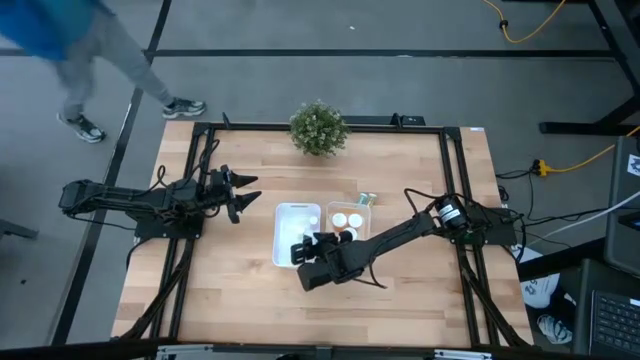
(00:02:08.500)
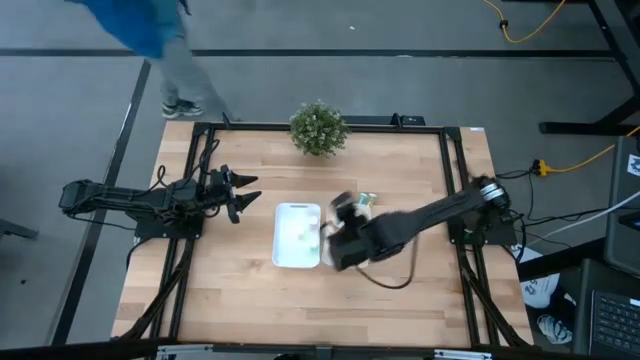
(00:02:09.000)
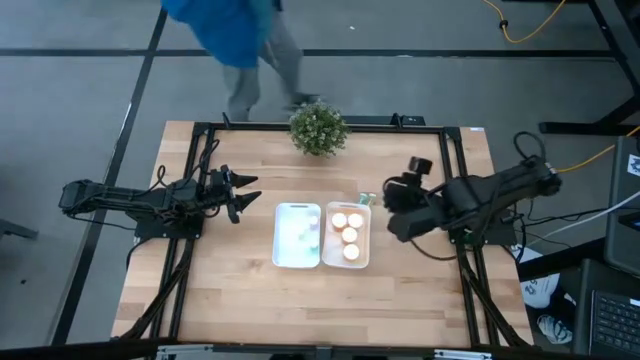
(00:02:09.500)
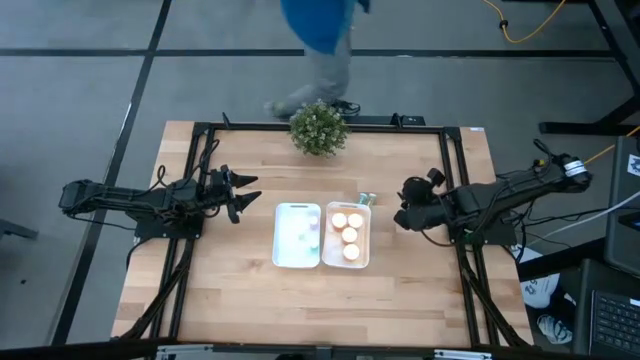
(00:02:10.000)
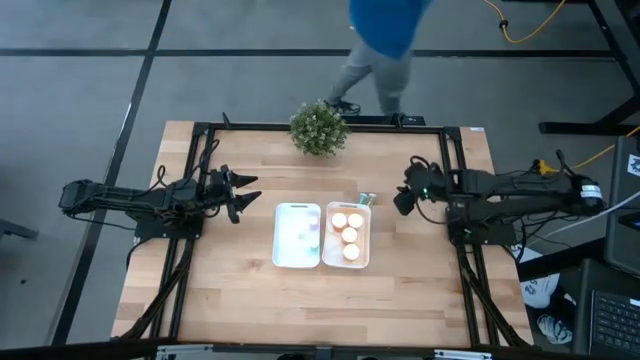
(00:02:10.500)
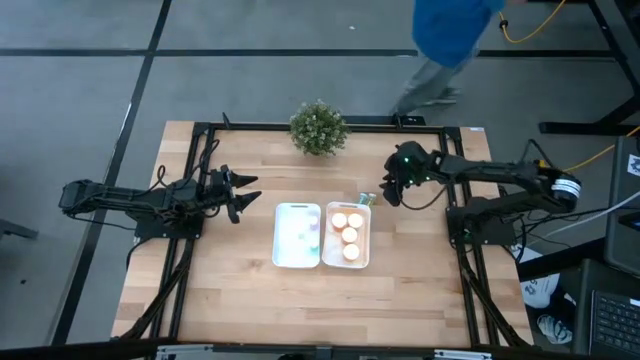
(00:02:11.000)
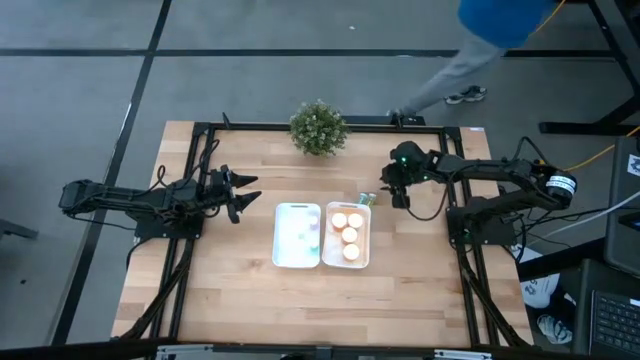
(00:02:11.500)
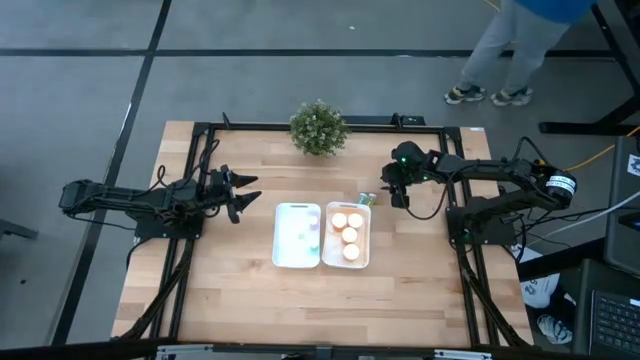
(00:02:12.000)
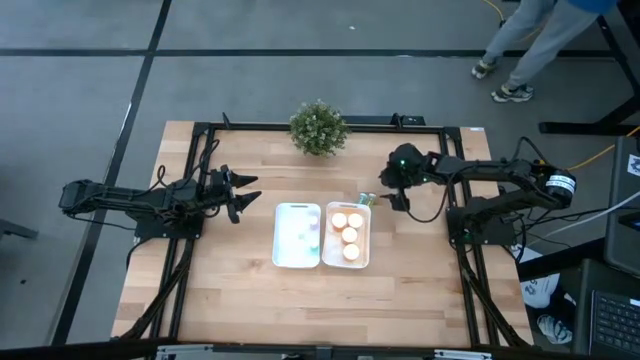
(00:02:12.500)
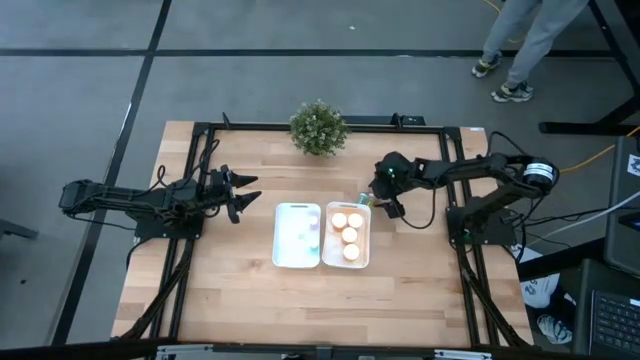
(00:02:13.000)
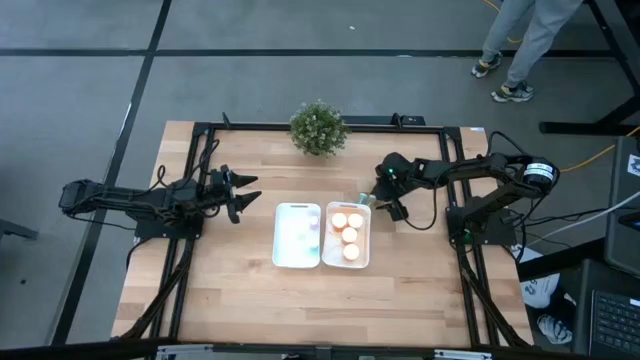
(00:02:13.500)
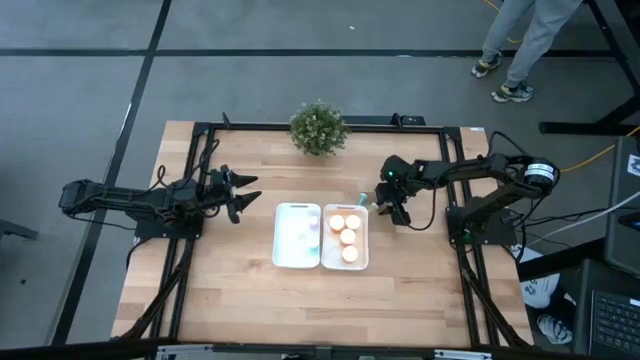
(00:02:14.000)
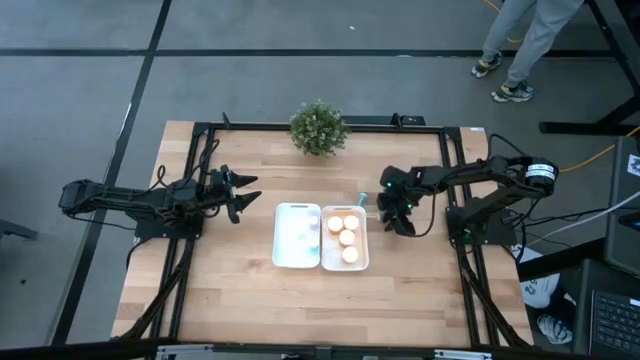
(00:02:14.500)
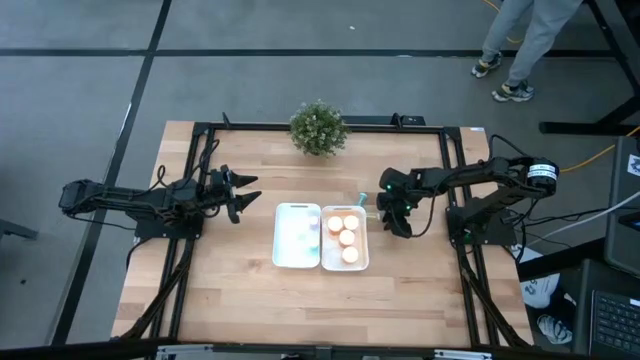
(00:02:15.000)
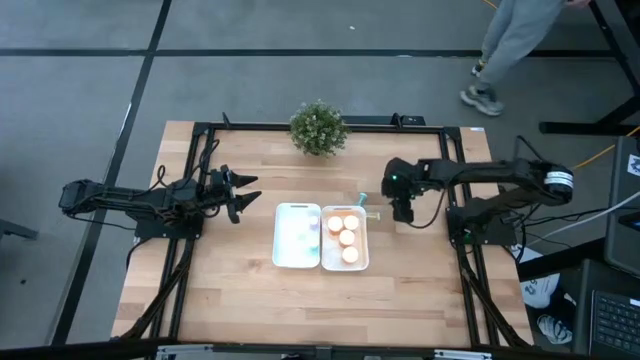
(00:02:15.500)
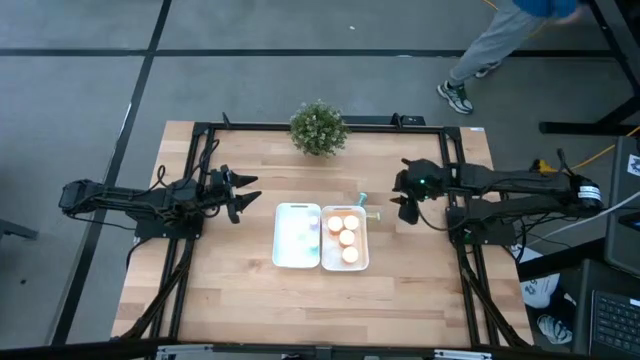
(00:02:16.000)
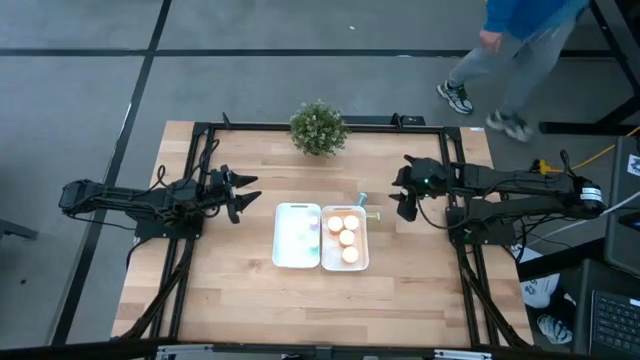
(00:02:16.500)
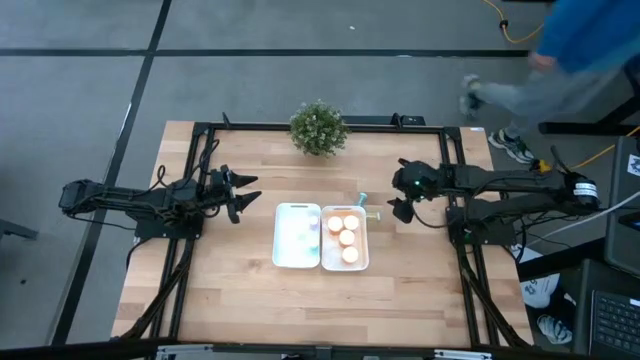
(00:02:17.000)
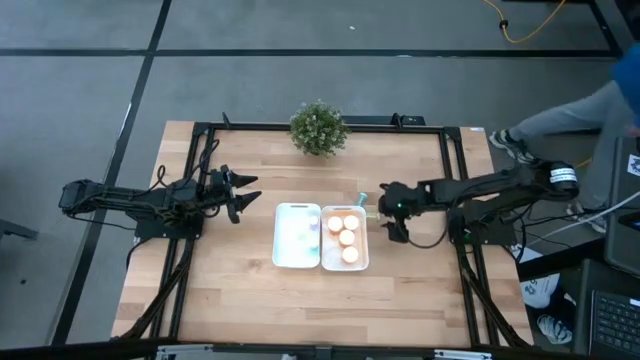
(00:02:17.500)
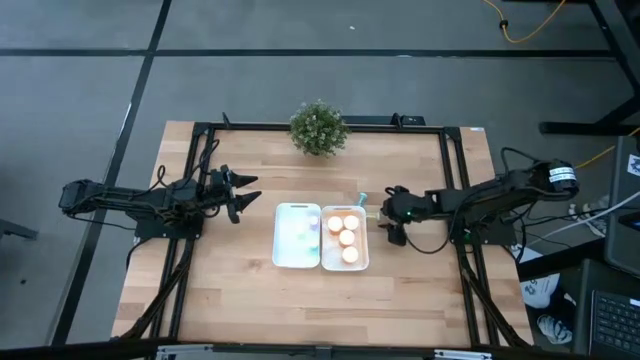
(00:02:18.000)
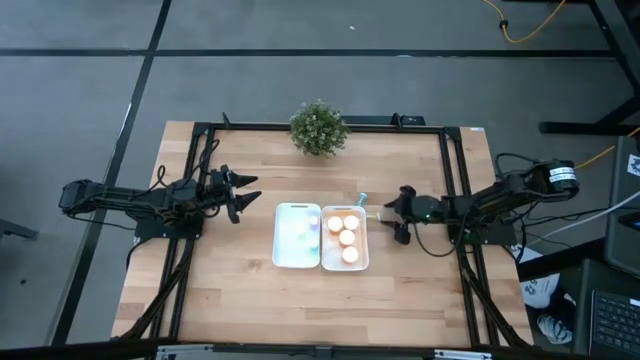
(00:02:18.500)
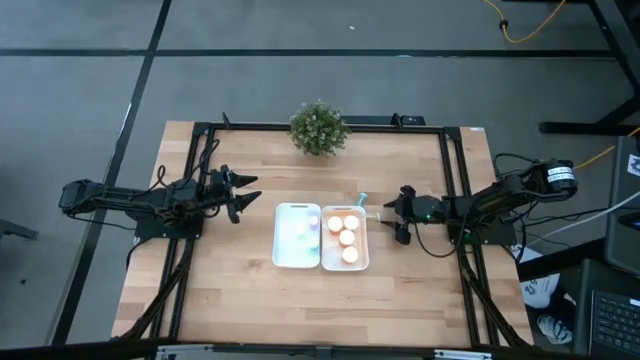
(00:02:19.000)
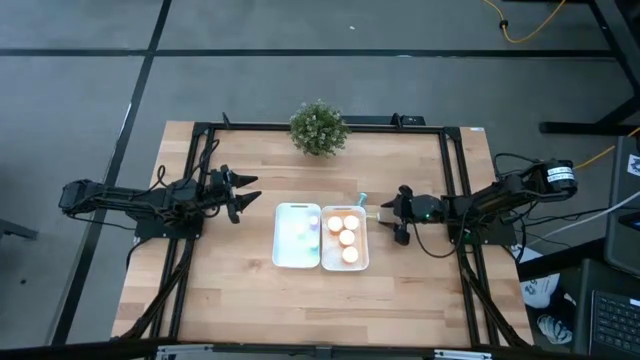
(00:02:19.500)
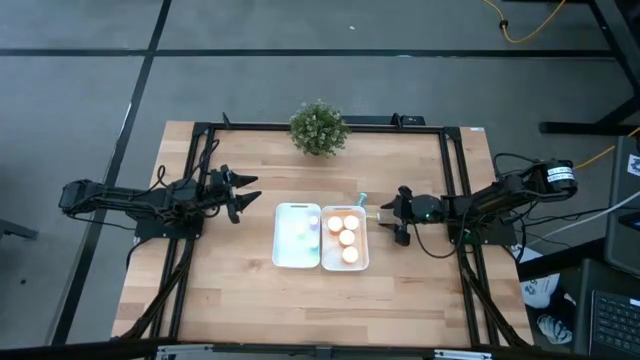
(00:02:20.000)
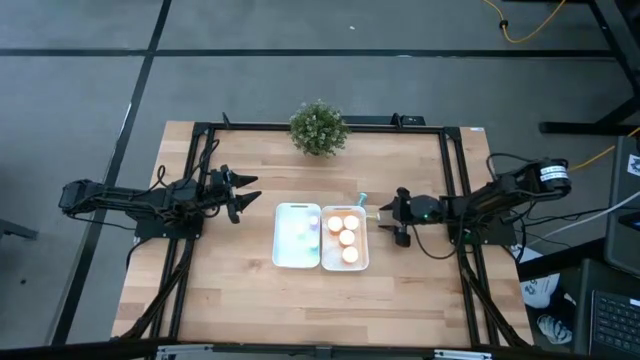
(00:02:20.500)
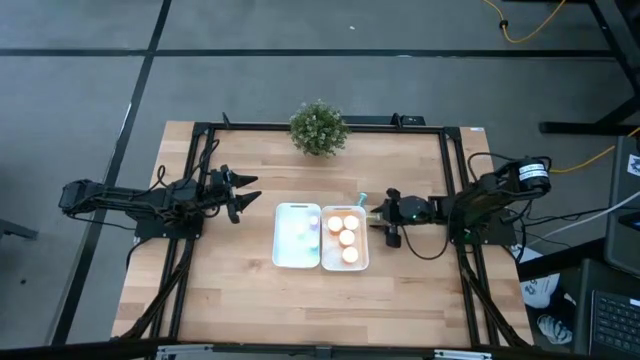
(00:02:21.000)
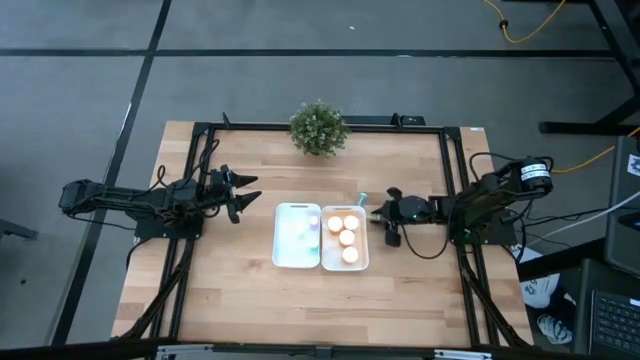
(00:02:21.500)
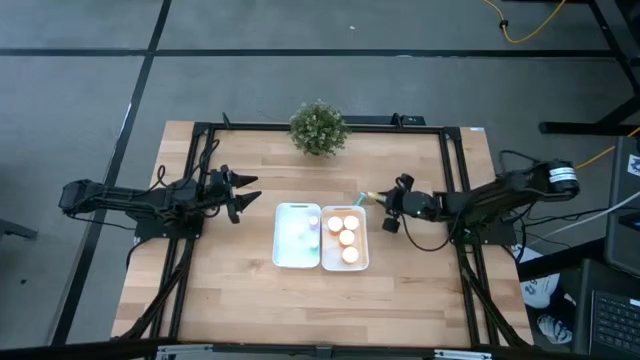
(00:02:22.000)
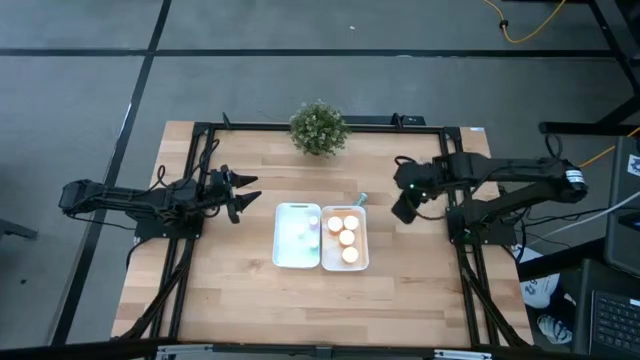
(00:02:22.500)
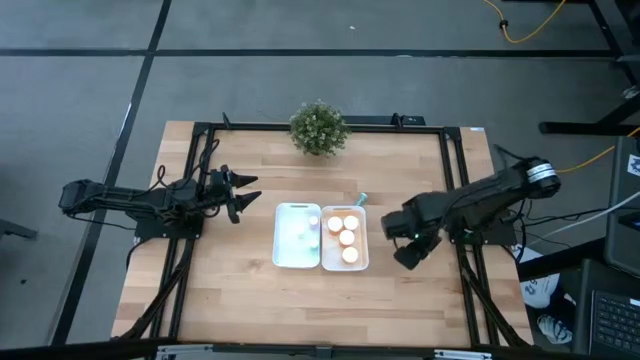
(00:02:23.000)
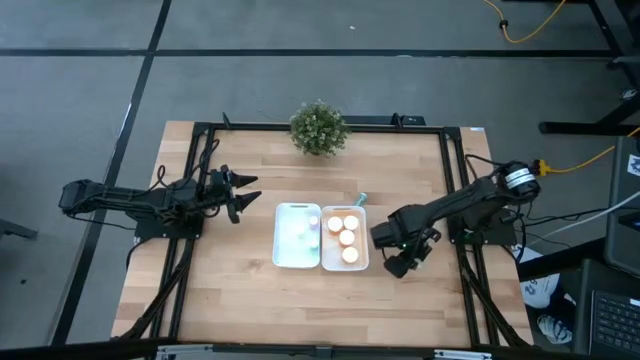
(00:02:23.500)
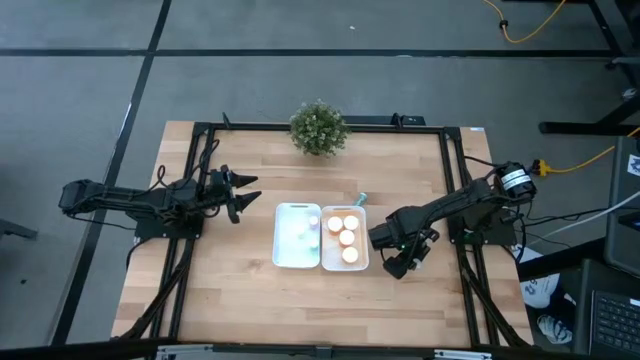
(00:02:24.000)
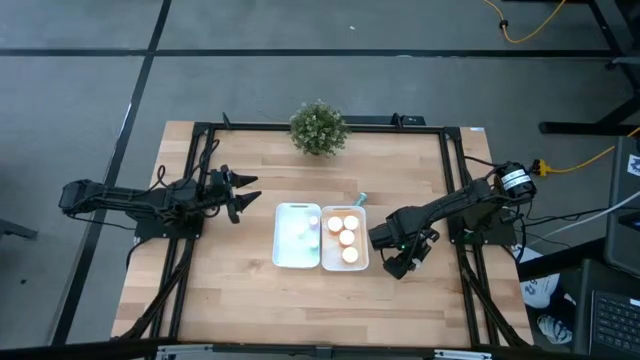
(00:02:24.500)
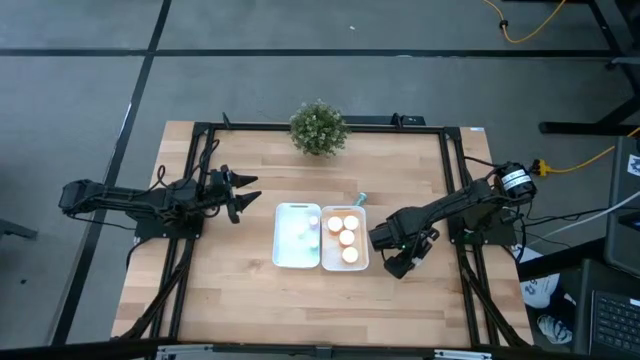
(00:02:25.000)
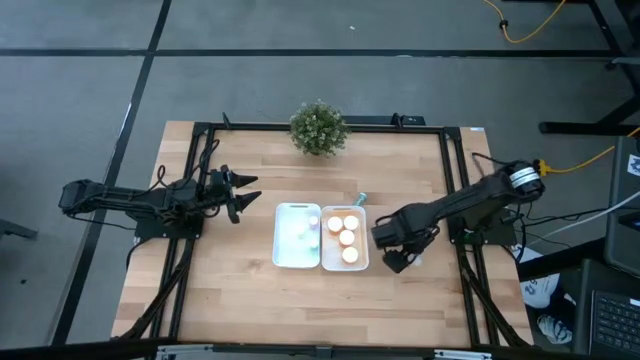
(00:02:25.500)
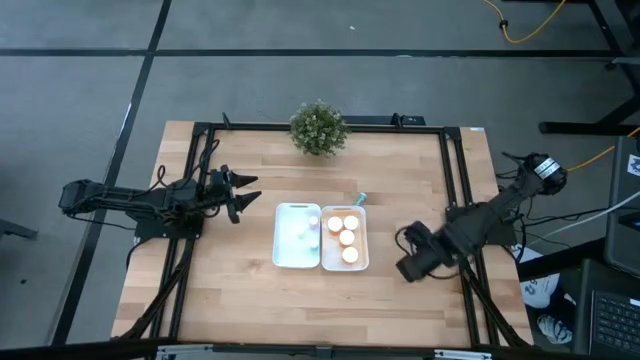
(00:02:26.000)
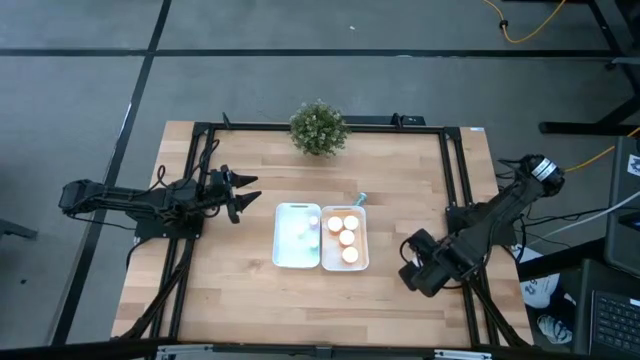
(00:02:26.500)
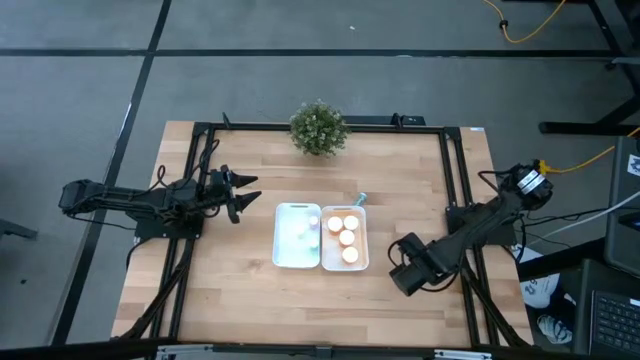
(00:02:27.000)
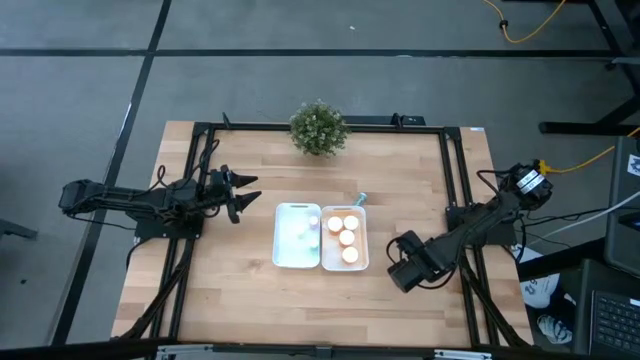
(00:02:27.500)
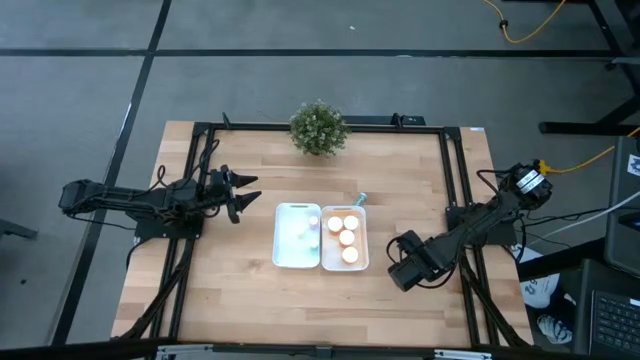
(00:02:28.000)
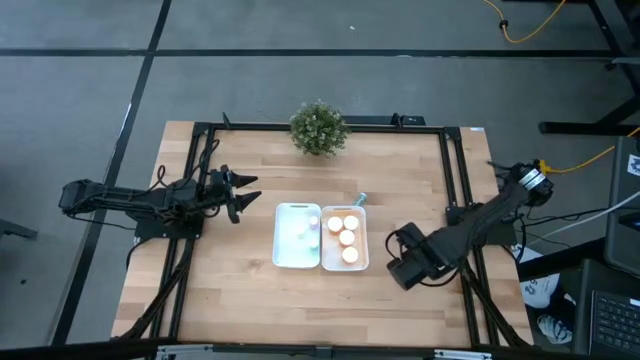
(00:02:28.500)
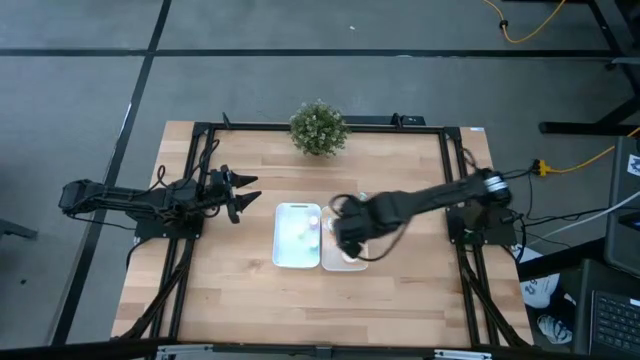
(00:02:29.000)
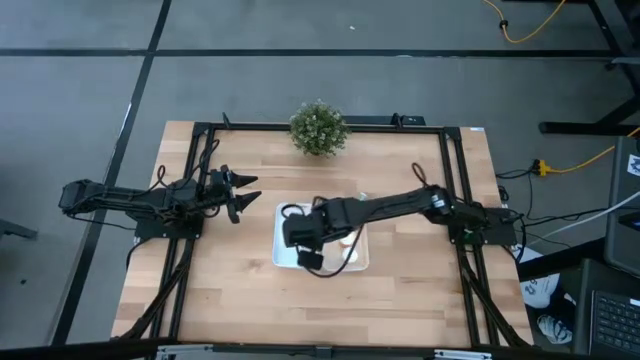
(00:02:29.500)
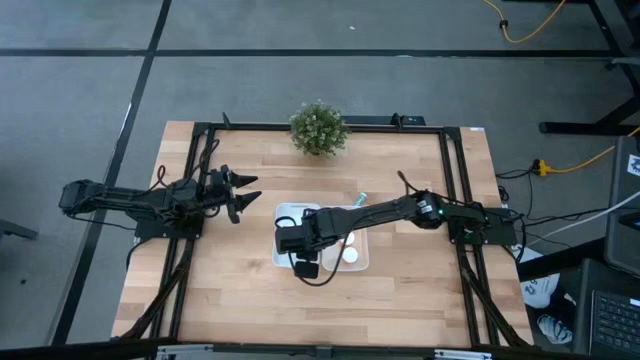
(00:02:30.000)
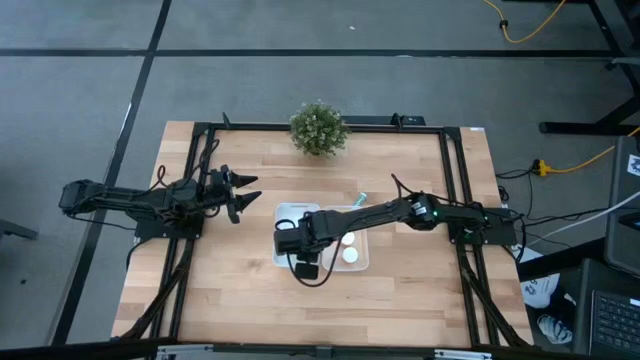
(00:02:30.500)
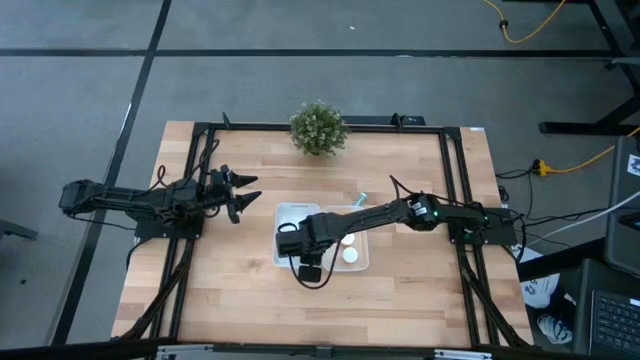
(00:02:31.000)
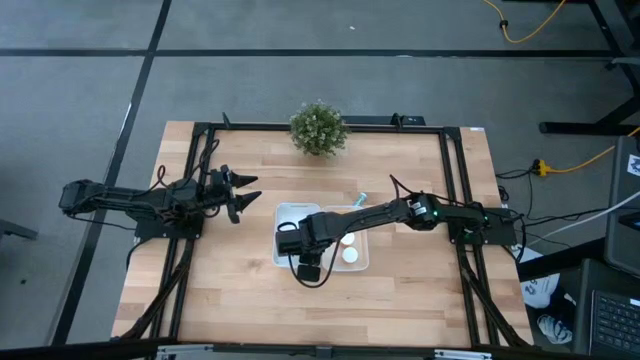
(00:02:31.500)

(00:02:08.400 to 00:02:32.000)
Task: Pick and place medicine bottles into bin by pill shape (circle, oval)
Put the yellow tablet bottle into the left white bin
